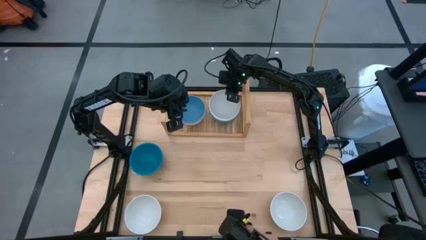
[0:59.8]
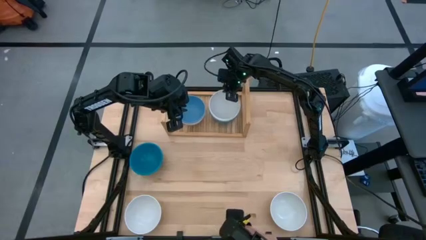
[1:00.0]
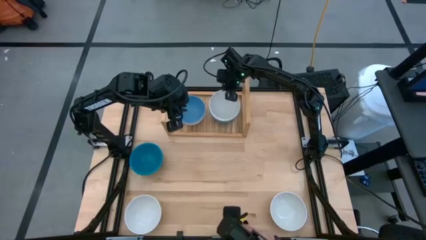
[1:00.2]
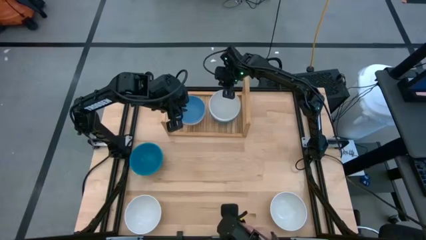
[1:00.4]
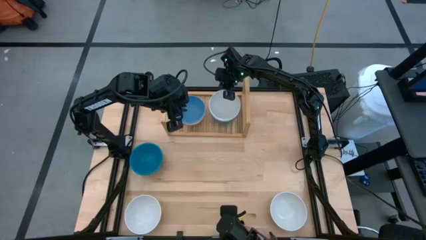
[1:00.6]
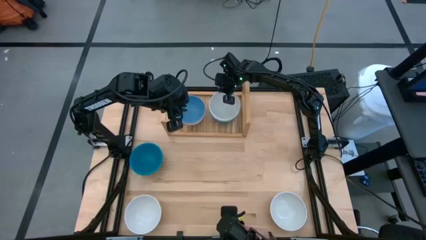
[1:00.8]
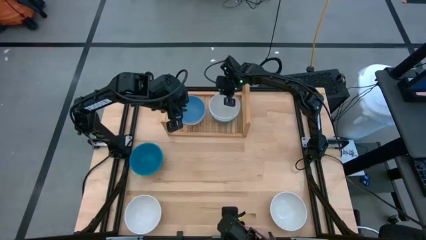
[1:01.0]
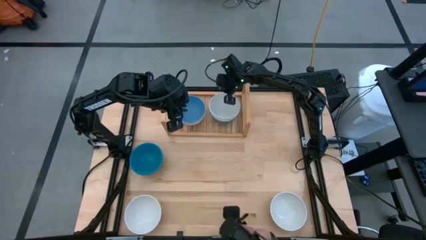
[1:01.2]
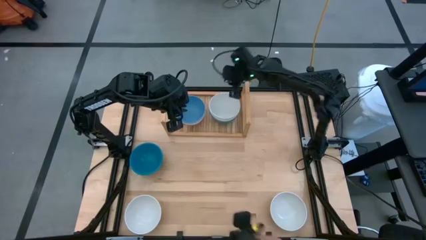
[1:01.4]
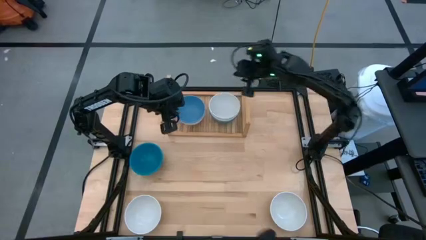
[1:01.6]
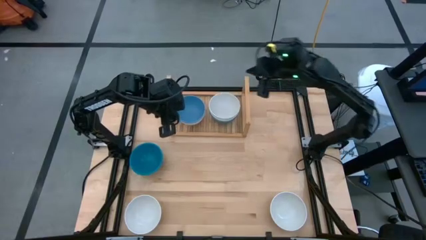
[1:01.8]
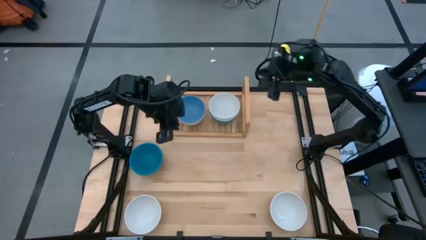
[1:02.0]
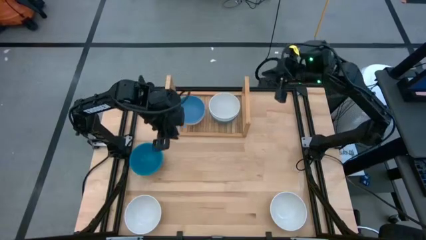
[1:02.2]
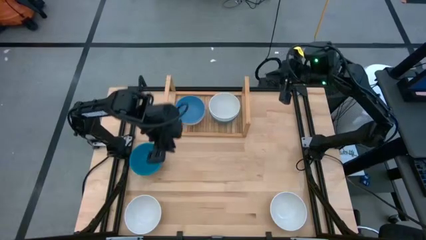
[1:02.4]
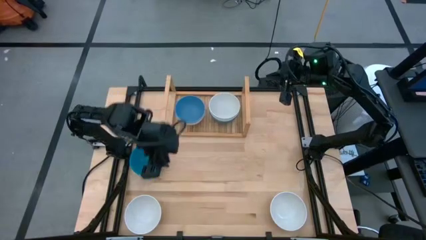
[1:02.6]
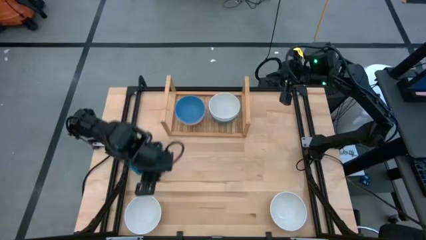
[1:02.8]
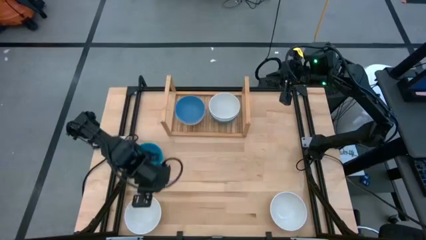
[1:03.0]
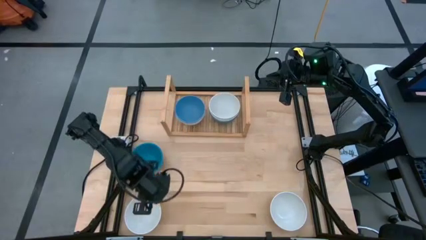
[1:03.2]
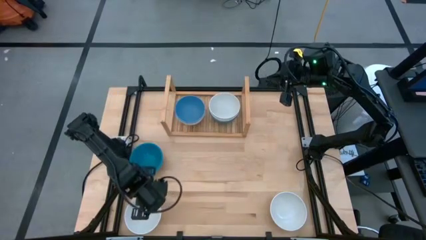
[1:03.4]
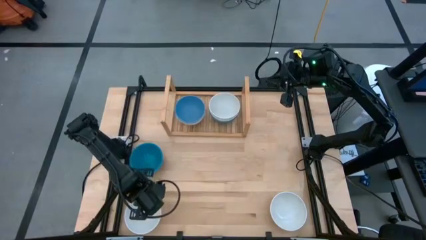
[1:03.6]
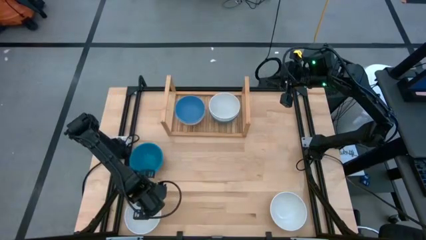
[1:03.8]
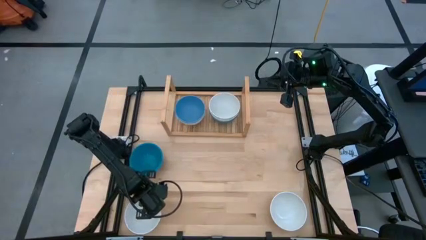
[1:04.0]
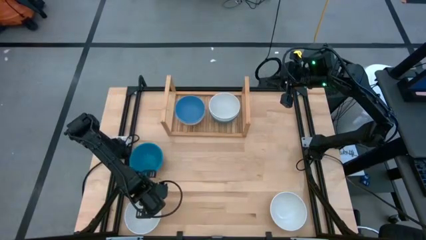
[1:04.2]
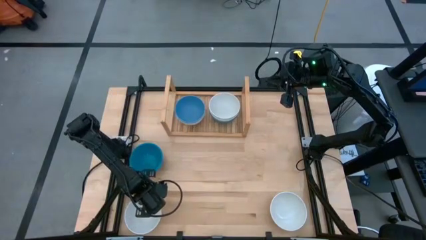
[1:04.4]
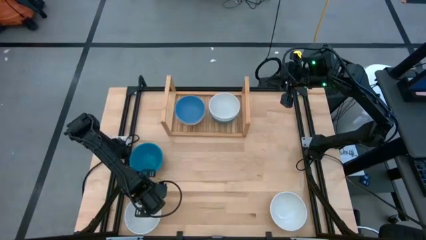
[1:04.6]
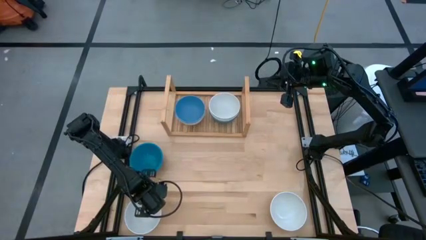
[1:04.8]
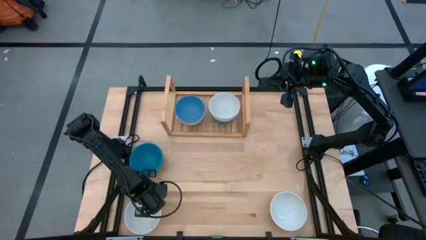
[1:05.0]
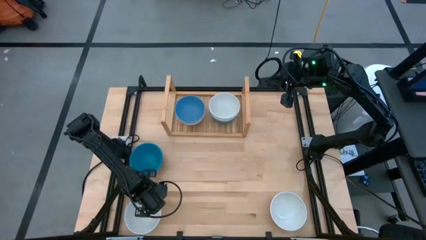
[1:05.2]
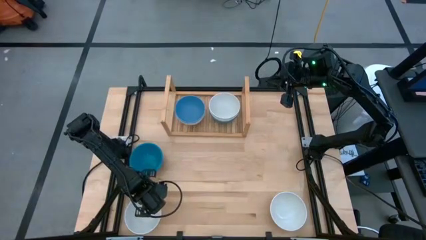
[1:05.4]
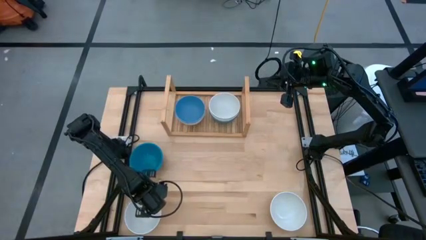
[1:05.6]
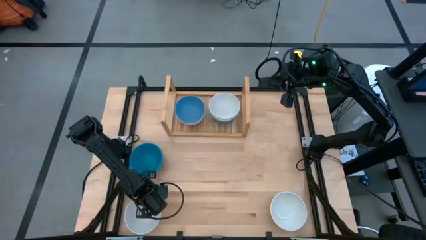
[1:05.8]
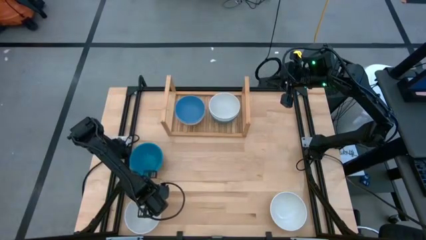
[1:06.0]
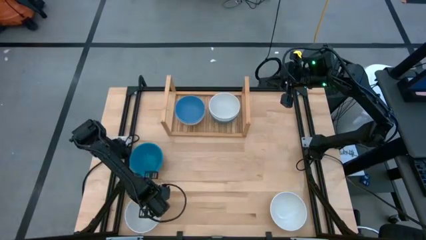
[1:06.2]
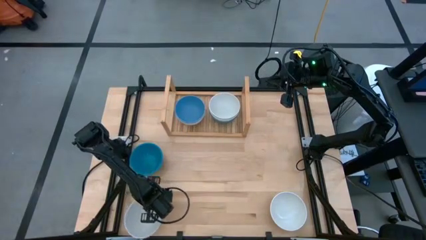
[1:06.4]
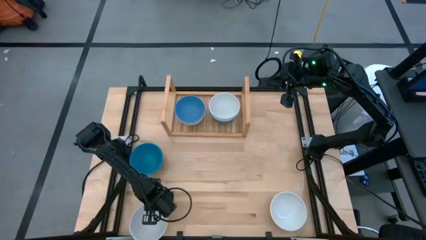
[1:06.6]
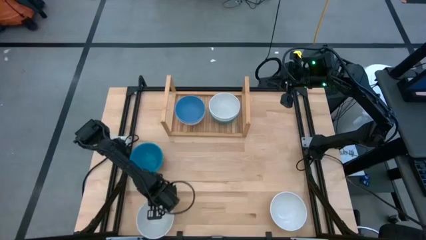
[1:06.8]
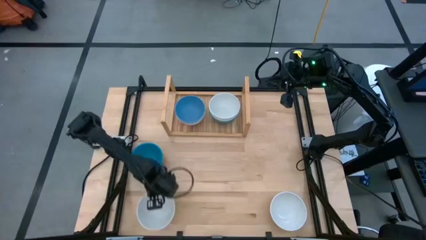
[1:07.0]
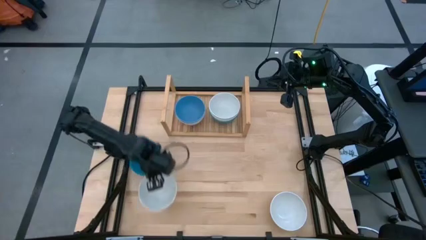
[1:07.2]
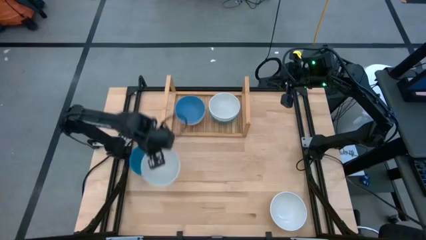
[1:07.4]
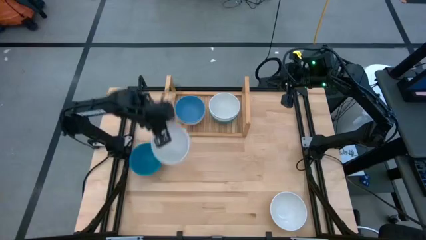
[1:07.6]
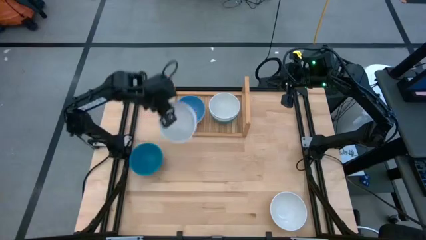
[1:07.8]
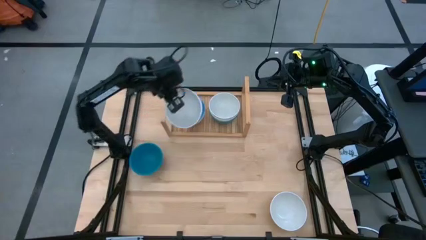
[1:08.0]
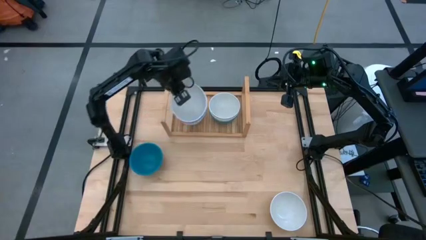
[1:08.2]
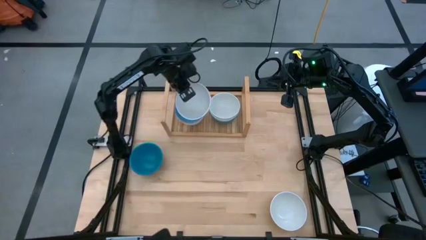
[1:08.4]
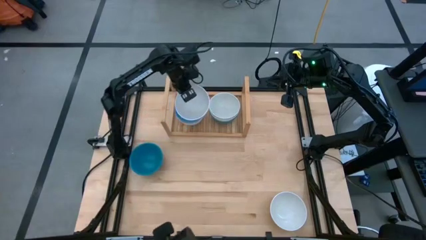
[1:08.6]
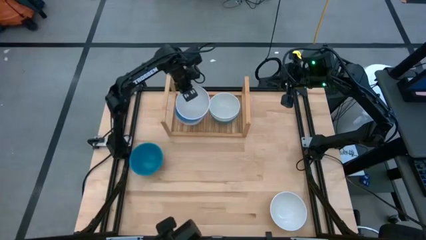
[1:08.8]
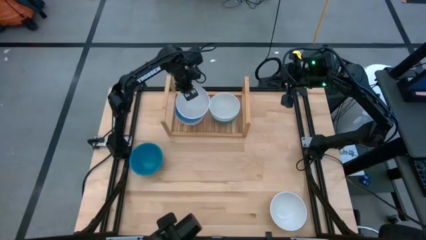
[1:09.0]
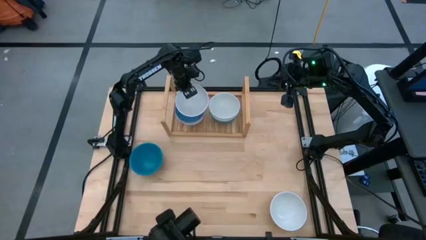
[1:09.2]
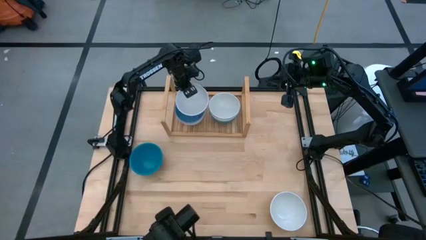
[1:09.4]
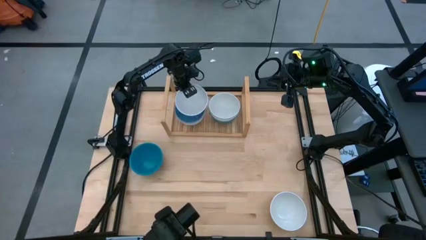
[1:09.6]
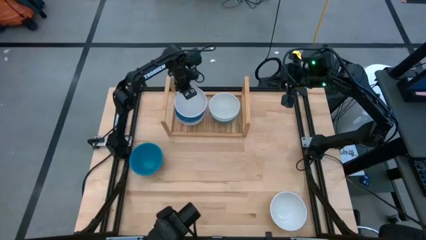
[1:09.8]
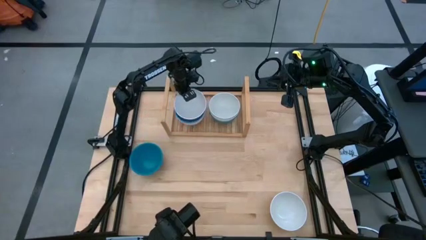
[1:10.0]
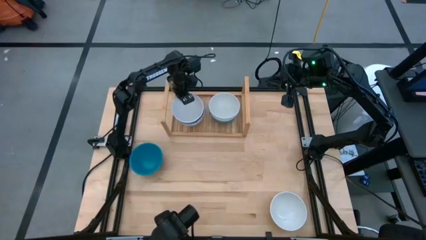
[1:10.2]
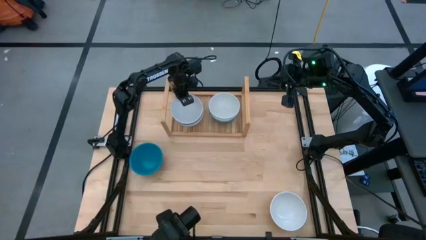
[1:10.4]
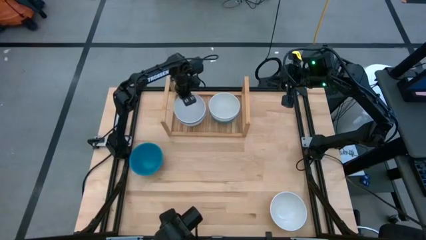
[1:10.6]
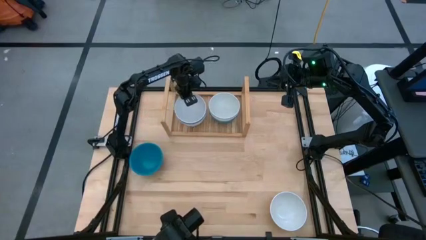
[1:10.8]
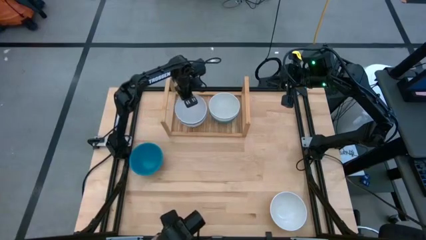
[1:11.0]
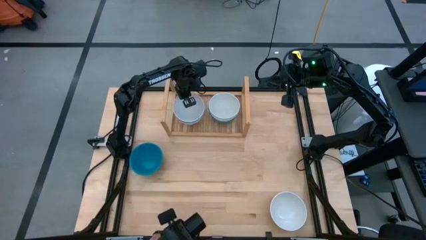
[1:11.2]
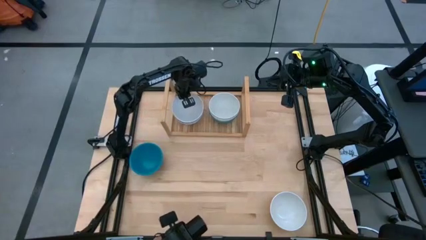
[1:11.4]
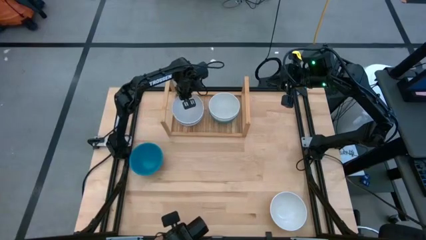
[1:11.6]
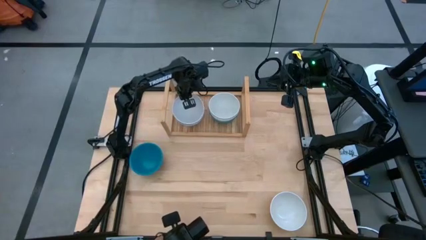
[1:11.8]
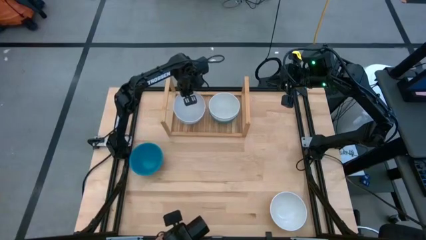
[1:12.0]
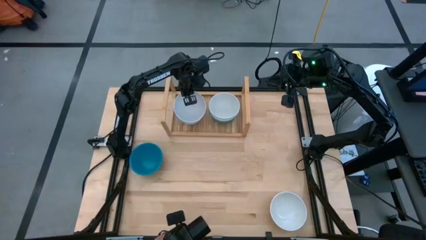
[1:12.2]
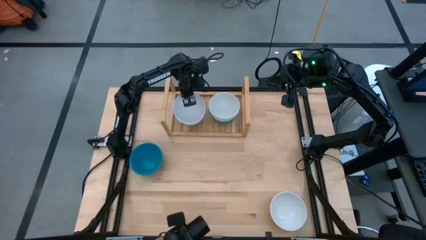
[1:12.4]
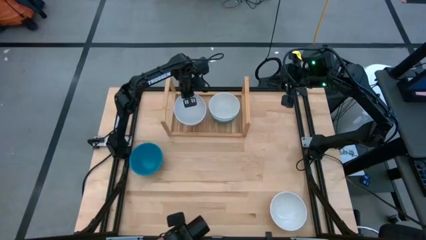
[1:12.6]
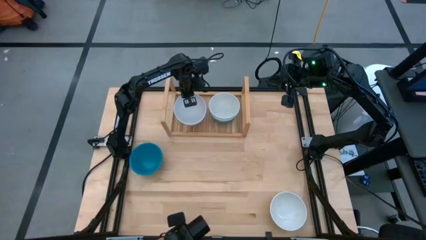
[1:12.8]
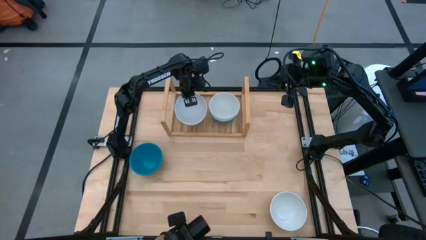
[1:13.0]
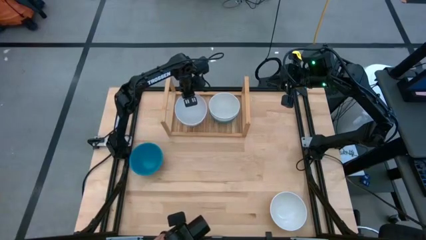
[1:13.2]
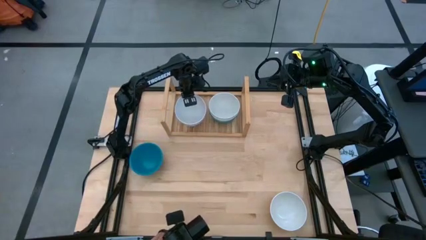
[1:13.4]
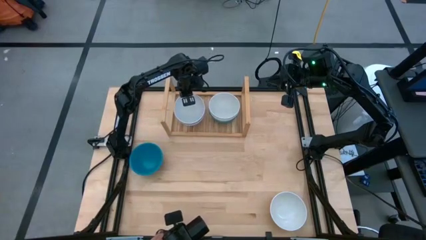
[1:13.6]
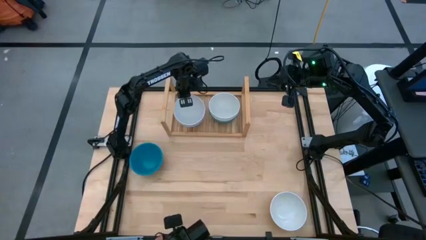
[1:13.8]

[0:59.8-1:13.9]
Task: Place and stack bowls onto a shelf
Stack the white bowl on the right blue bowl on the shelf

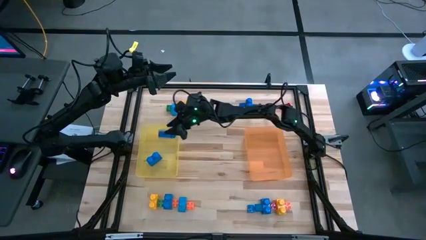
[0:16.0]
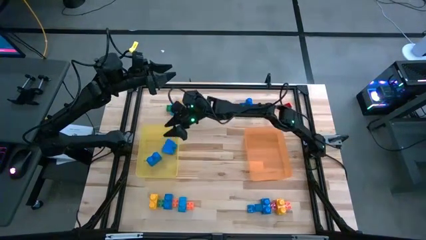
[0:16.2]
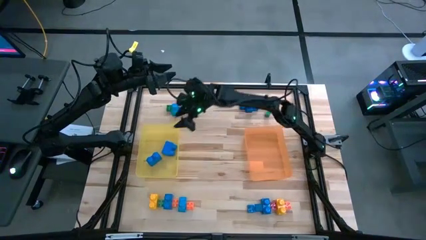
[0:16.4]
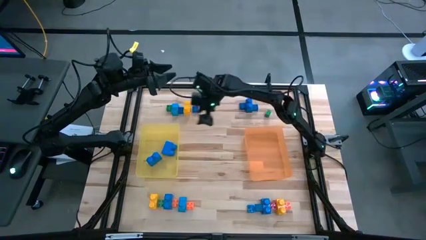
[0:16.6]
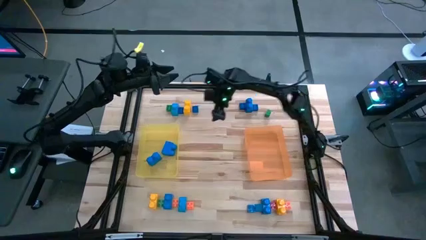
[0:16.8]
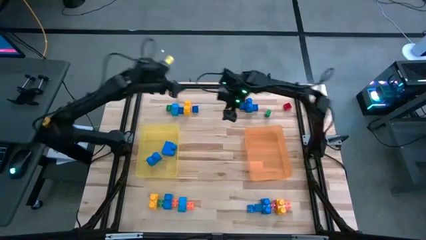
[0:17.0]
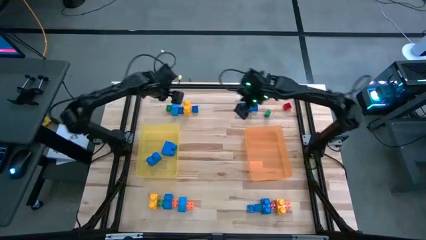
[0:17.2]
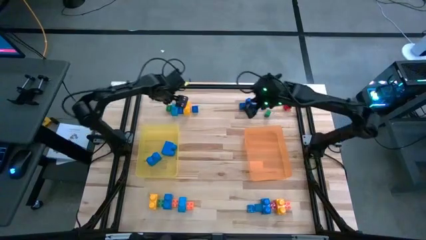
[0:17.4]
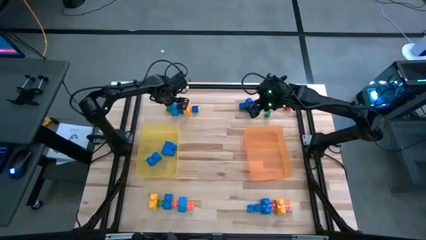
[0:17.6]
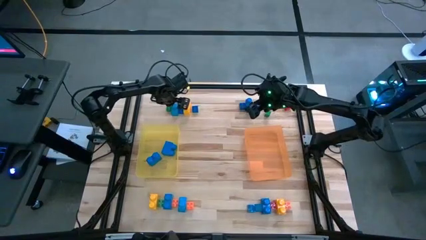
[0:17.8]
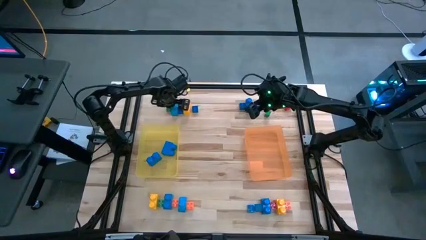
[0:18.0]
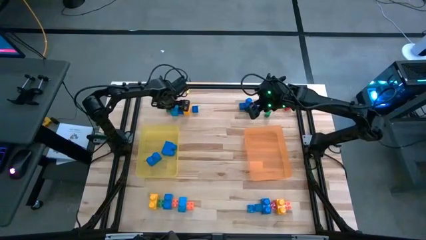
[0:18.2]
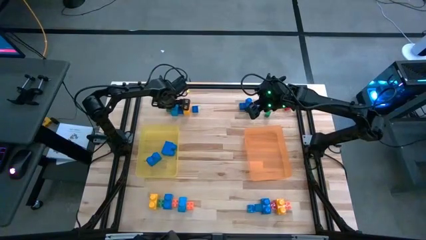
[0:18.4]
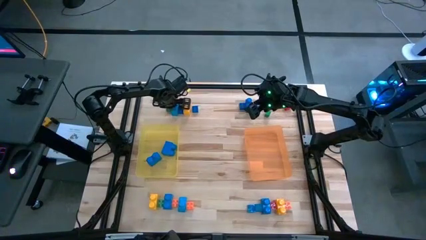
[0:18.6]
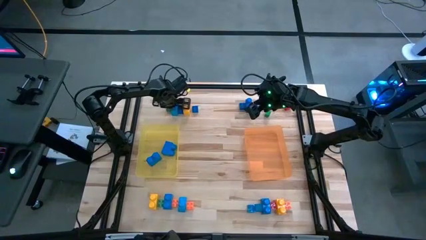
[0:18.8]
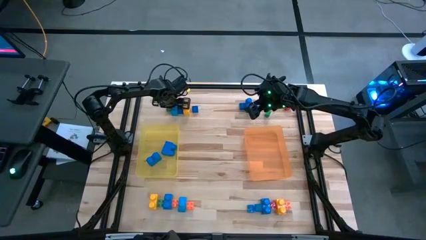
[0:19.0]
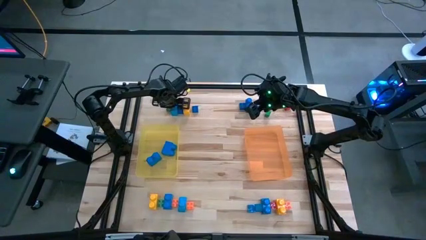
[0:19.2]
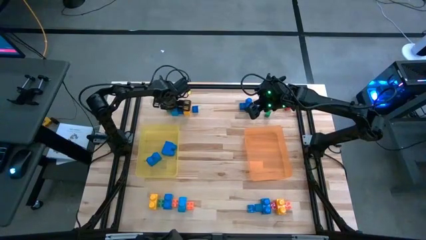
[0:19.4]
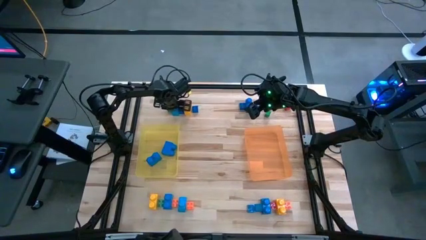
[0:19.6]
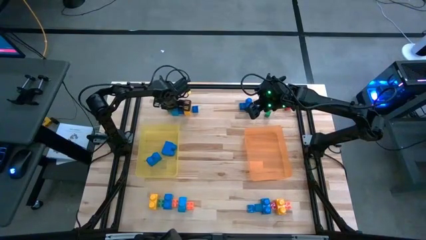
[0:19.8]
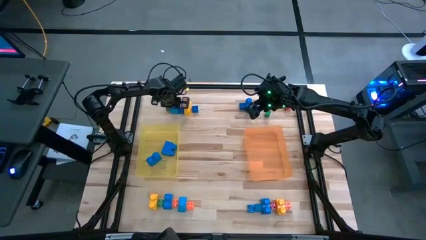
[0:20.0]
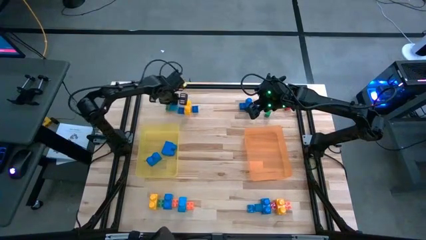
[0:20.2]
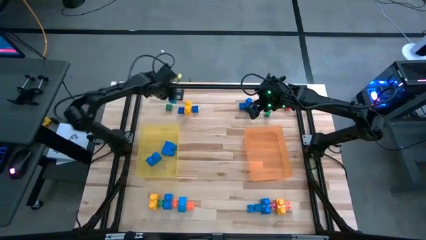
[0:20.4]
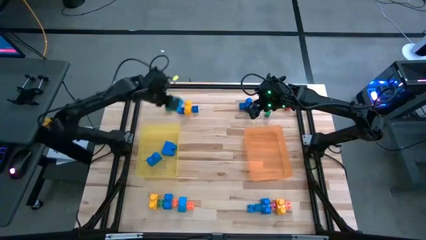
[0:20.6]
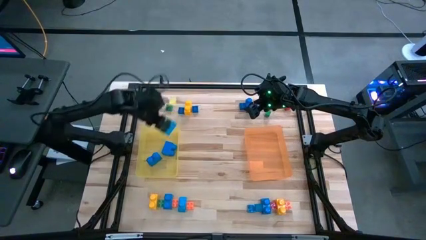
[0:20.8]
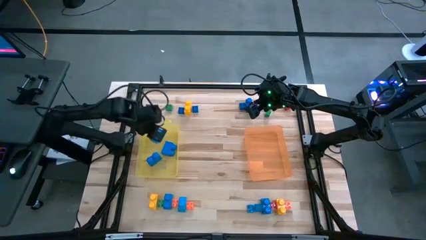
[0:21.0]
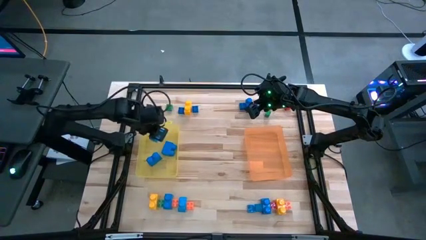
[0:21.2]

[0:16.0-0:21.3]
Task: Sort blocks by size
Put the large blue game piece into the yellow bin
